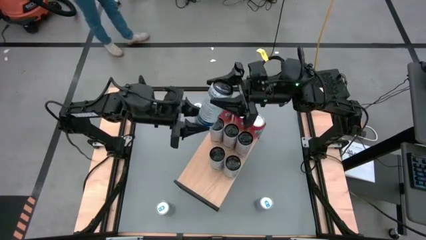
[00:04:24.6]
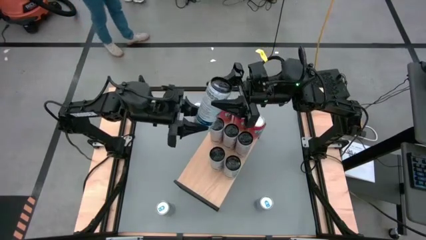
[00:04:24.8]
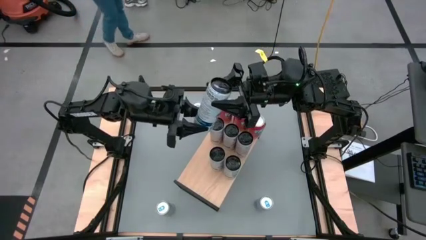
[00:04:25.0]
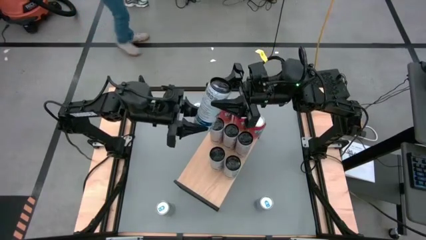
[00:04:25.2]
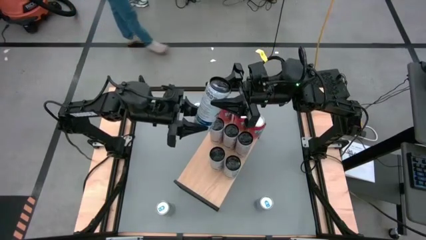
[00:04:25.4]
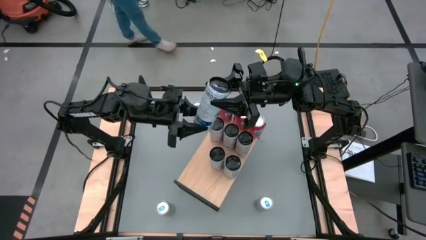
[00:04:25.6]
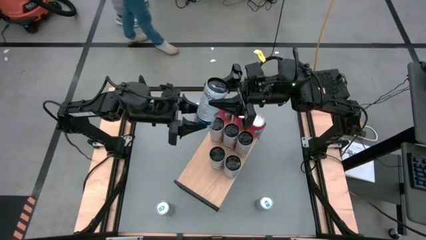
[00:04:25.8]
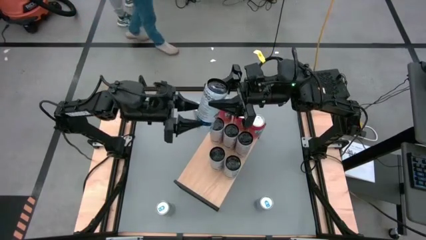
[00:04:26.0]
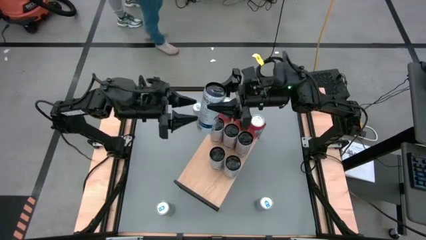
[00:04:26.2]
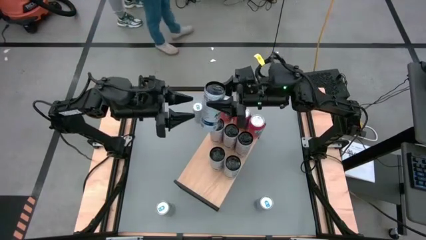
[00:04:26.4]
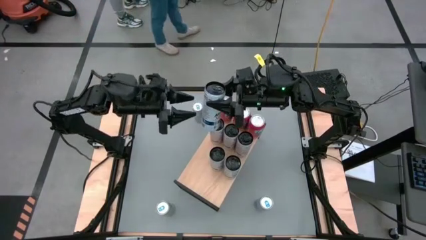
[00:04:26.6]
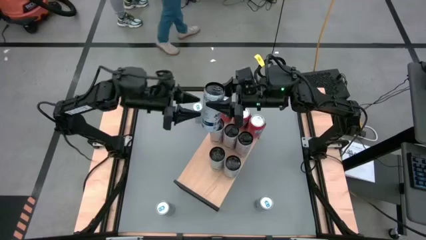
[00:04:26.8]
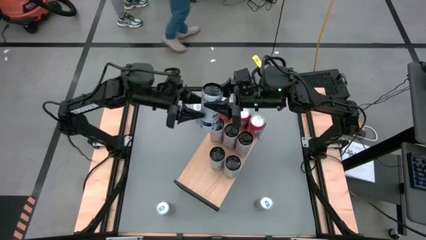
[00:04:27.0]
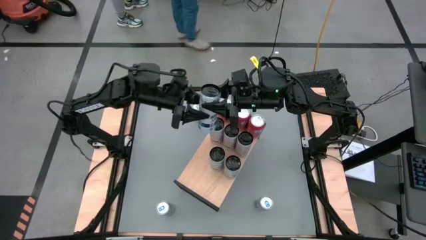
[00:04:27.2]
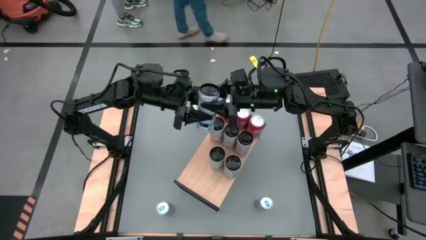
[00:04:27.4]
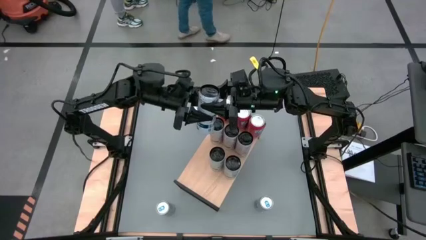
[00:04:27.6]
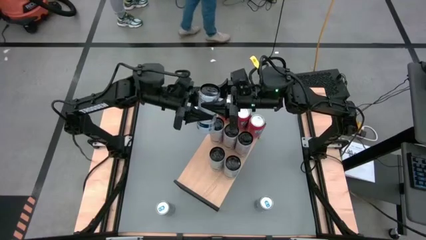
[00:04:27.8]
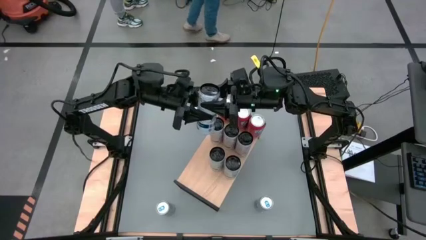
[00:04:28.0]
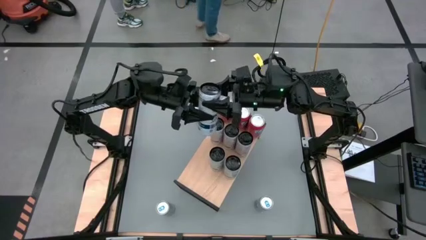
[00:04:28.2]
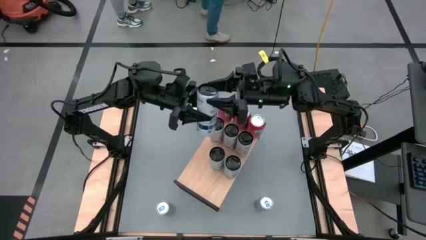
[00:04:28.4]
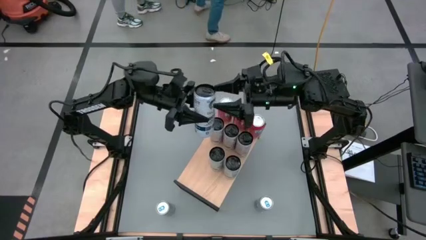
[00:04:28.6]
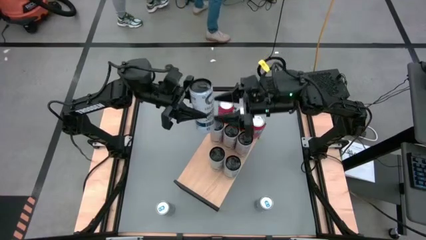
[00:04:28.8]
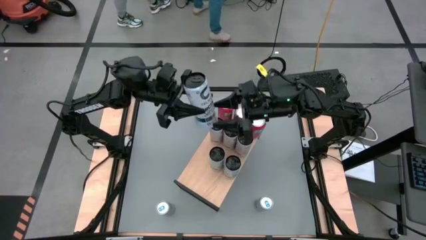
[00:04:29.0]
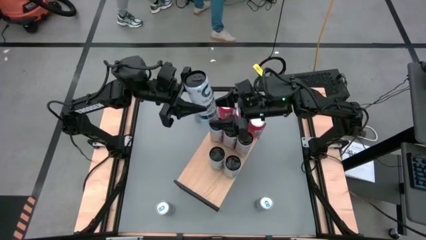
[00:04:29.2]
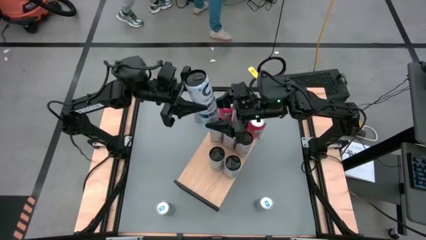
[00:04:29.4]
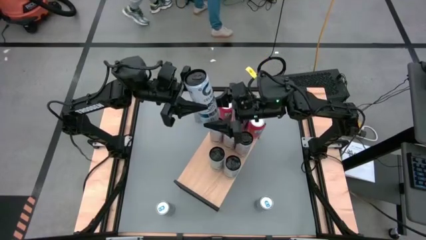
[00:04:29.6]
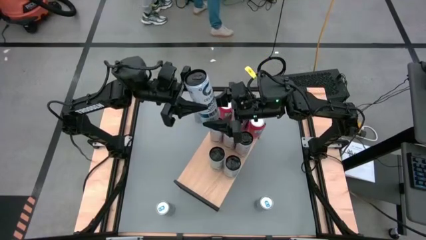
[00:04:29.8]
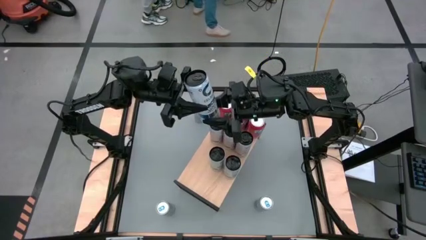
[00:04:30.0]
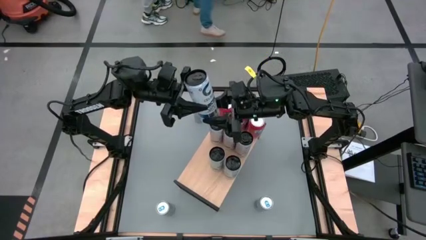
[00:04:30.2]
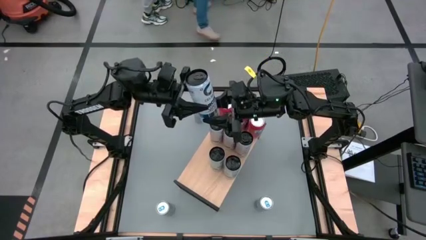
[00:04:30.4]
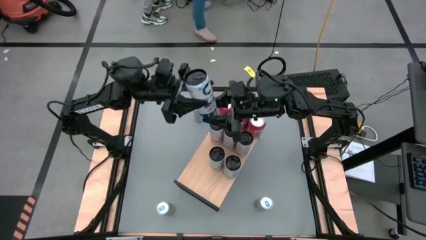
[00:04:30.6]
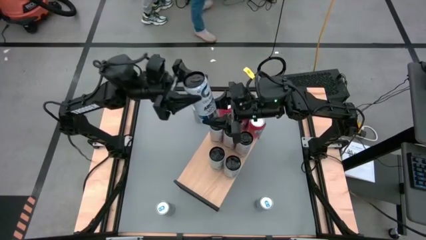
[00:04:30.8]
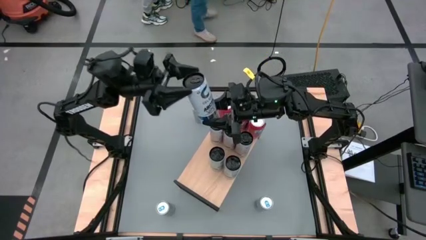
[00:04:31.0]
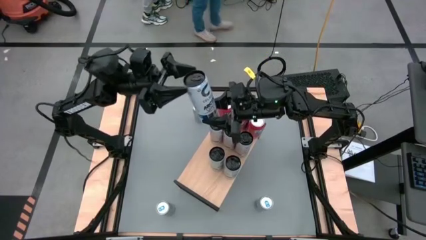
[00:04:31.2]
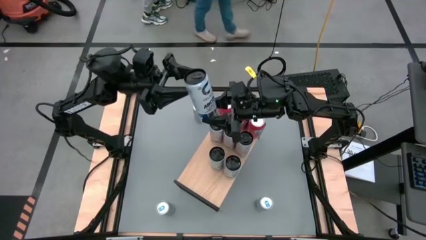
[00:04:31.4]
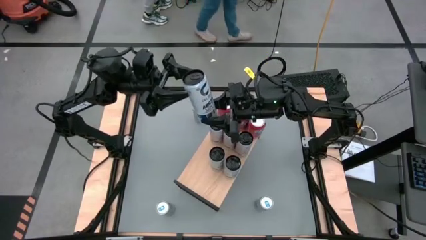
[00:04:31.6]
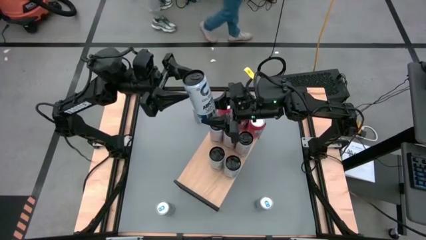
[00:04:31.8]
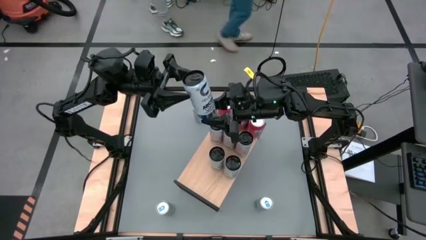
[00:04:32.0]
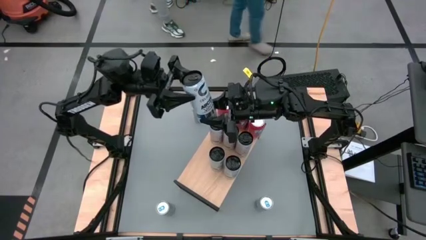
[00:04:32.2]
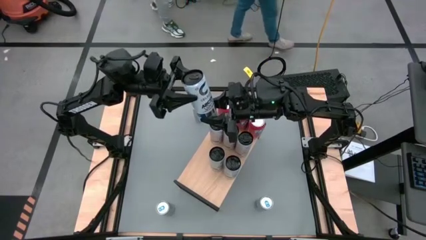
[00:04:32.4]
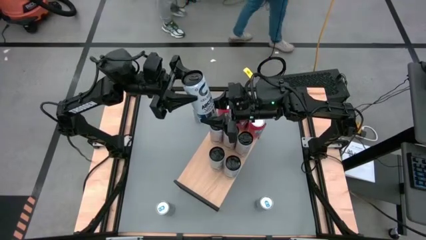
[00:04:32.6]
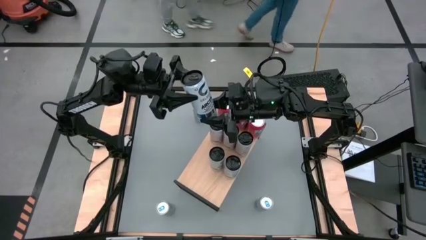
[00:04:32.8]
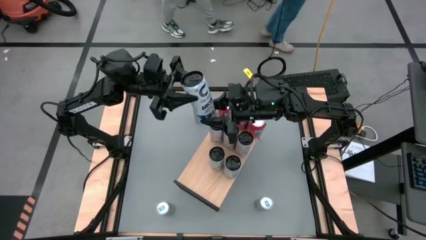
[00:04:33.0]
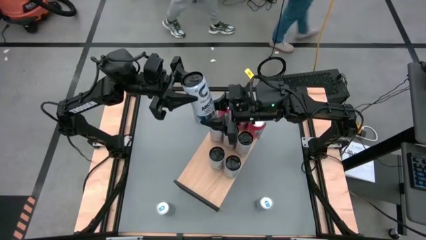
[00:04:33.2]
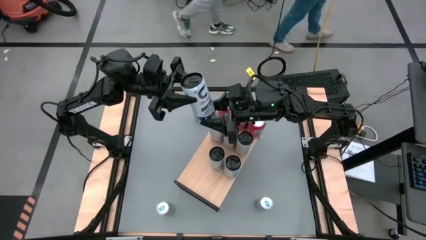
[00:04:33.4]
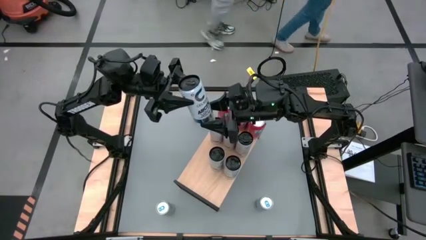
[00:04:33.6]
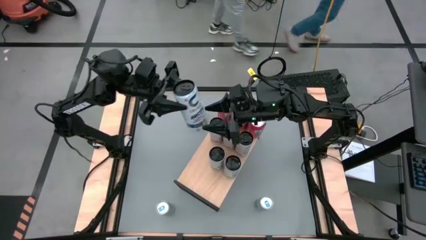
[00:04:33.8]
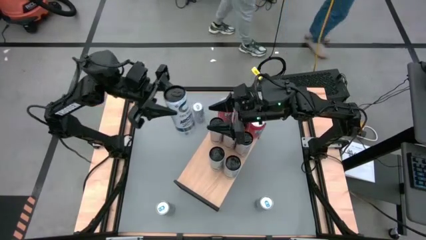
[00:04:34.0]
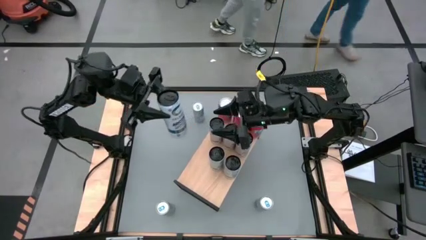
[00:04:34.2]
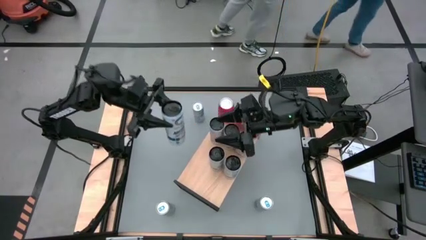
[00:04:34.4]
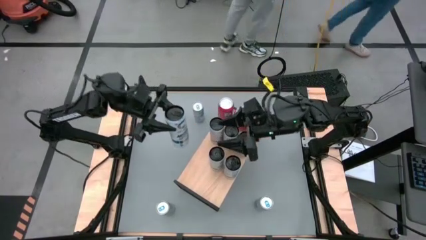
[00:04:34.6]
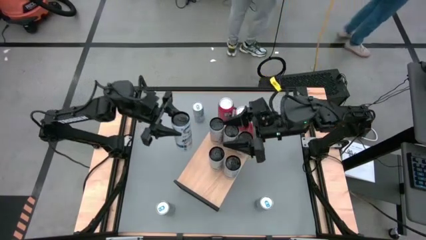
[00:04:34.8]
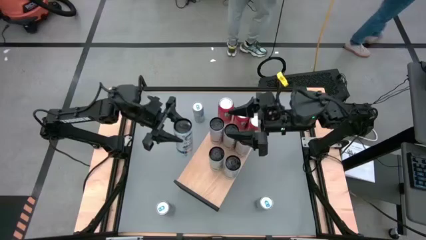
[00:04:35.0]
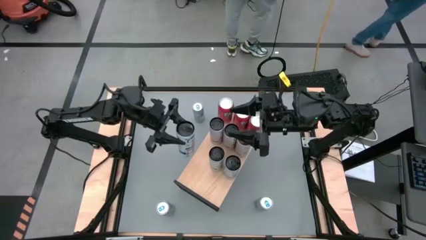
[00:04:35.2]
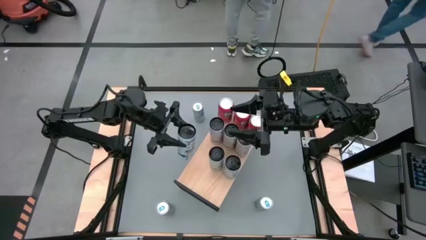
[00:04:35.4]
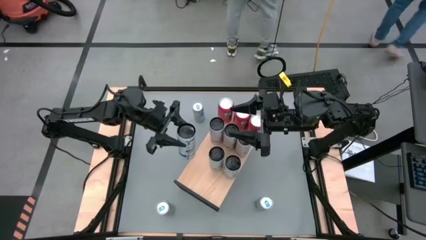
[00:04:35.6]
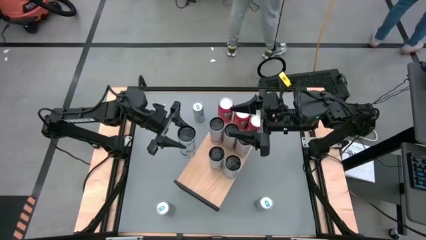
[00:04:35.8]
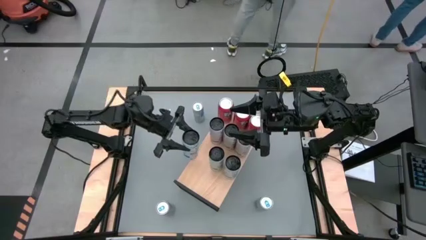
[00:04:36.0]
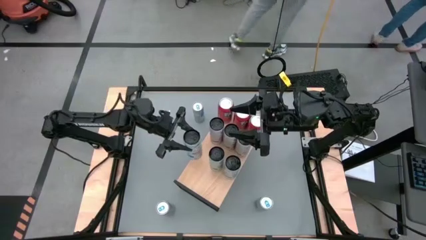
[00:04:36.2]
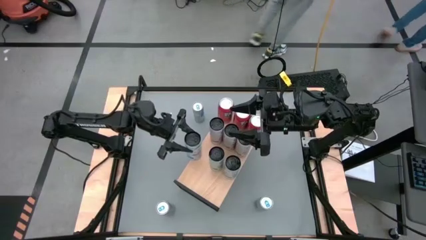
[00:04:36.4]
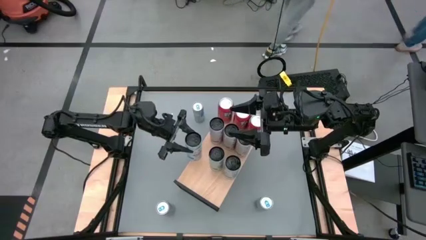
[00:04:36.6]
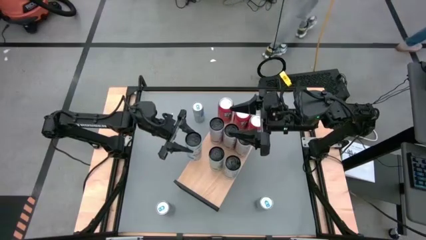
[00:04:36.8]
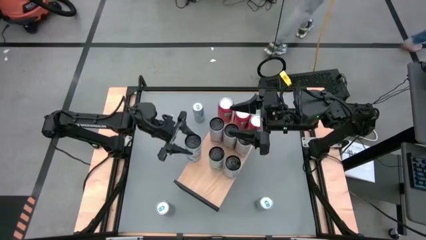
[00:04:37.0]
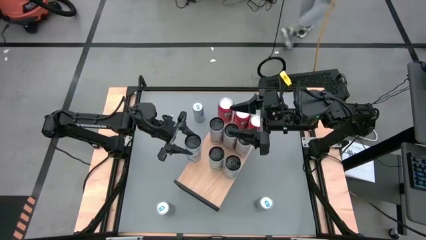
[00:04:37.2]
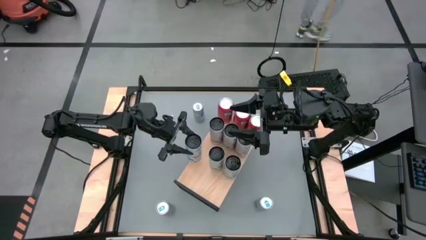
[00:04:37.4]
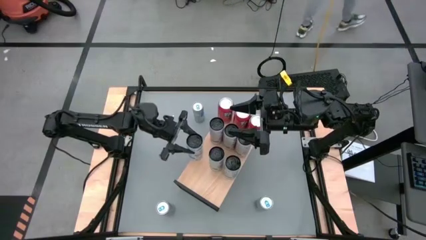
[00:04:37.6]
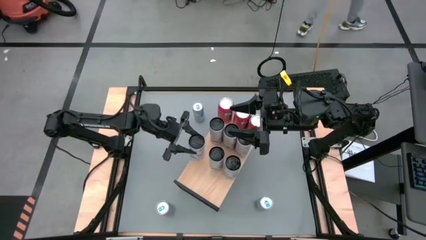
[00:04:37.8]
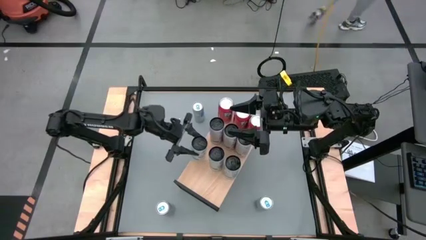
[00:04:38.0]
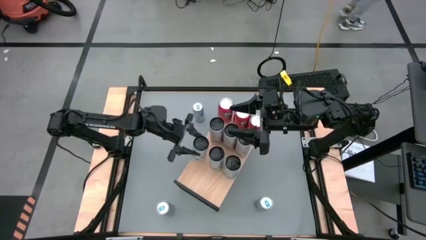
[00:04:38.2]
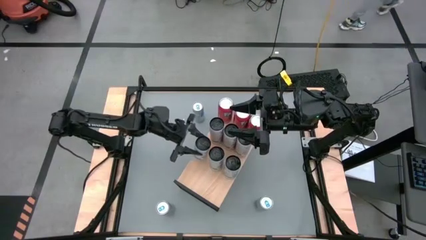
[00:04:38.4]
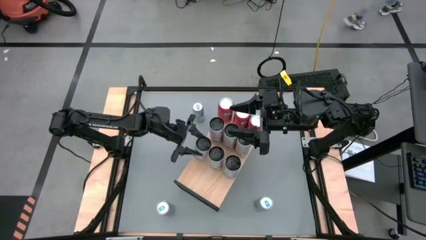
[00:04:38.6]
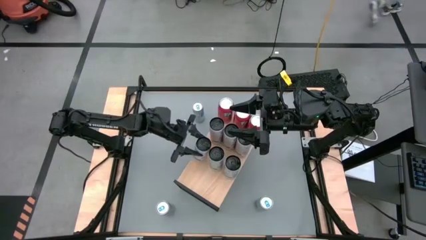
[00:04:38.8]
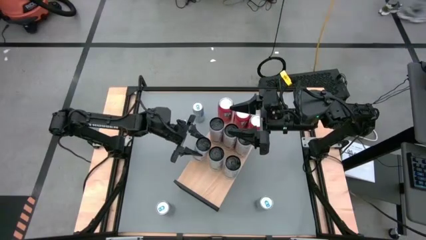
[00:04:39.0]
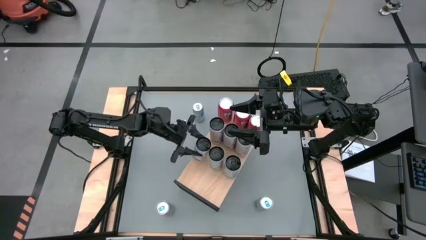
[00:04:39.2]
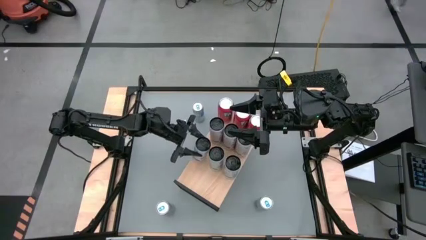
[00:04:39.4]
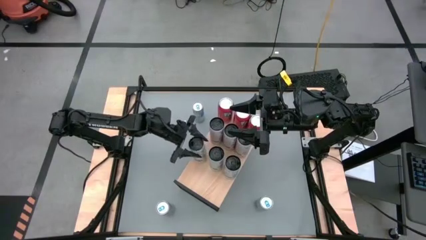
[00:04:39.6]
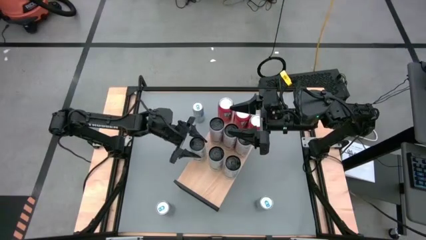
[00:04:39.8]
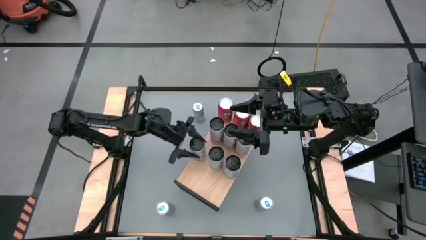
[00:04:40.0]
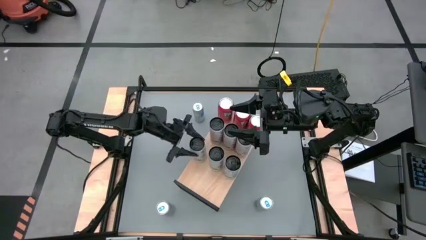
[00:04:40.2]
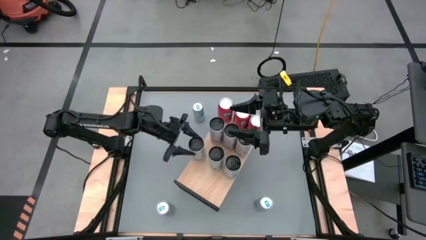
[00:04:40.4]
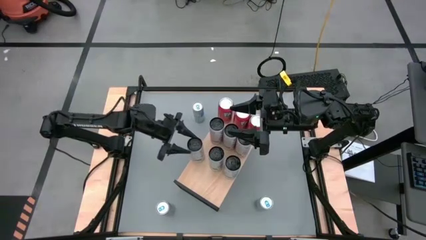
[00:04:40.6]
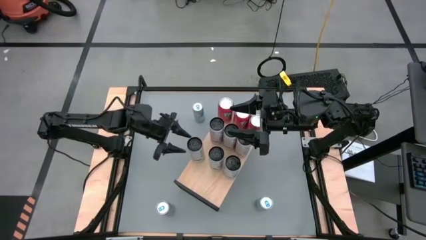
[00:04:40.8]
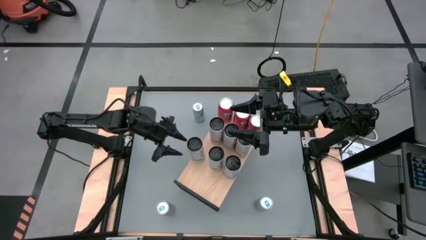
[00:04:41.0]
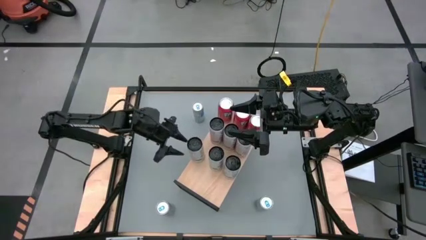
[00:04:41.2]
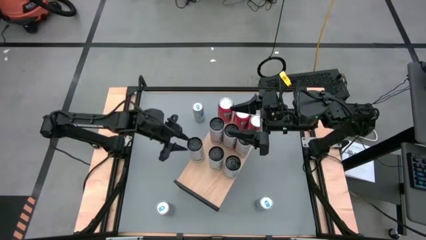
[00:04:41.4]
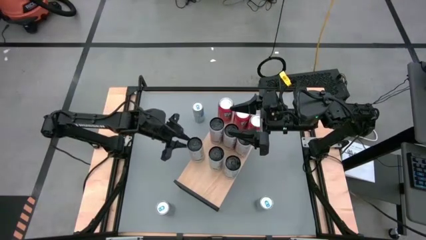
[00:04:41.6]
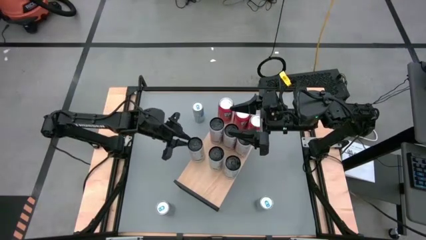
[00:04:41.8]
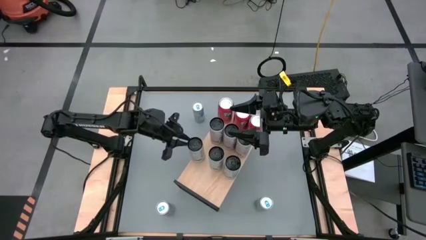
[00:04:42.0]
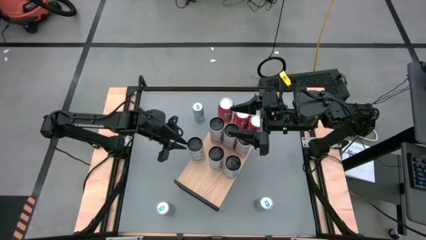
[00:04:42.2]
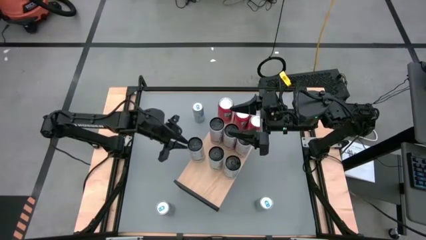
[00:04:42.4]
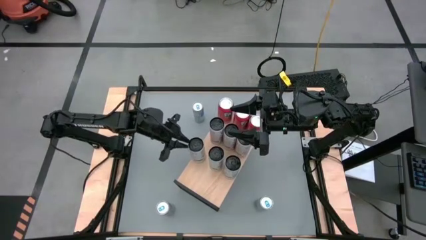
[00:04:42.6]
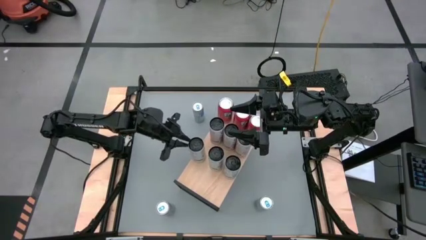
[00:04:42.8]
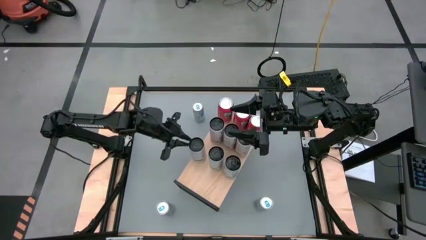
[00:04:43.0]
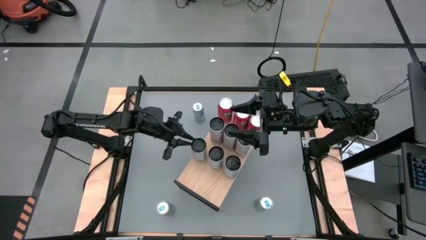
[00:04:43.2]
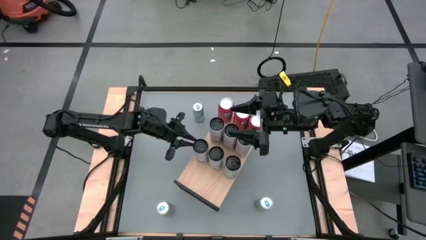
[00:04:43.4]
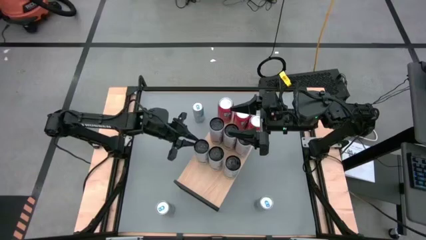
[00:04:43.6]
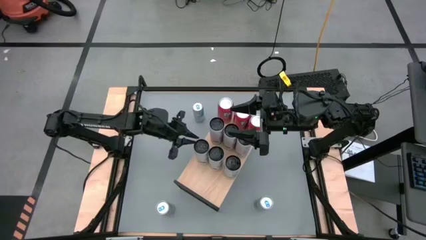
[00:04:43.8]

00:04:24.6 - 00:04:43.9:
Task: Place canned beverage on shelf
Put the white blue soda can on the shelf aligned with the other white blue soda cans
